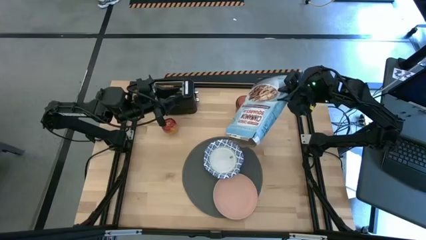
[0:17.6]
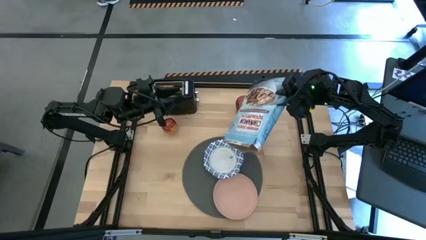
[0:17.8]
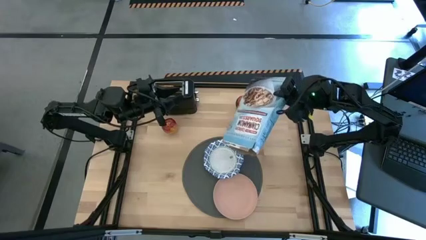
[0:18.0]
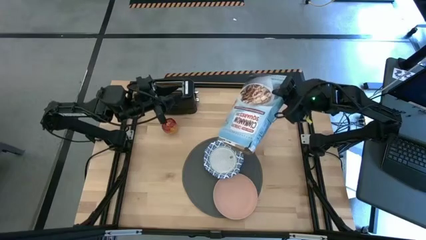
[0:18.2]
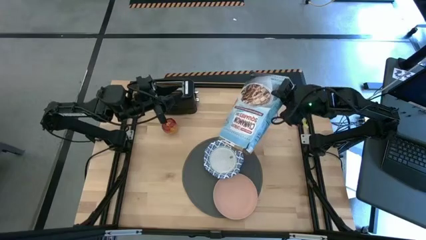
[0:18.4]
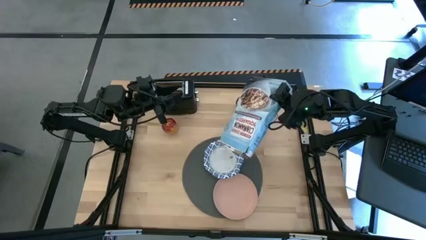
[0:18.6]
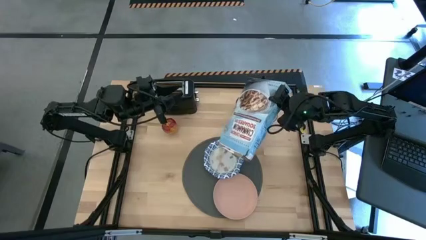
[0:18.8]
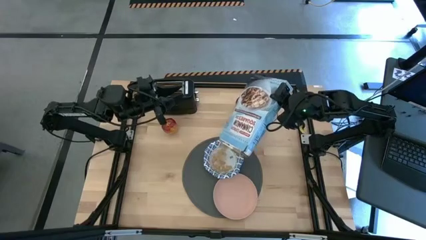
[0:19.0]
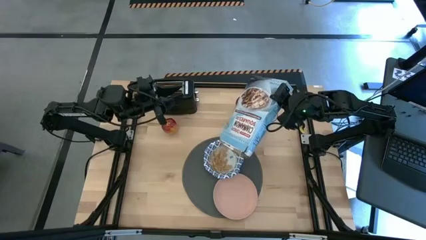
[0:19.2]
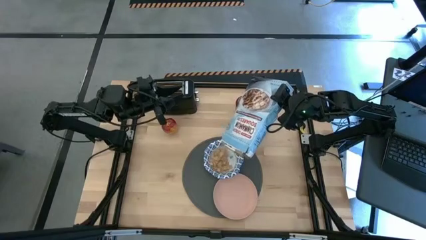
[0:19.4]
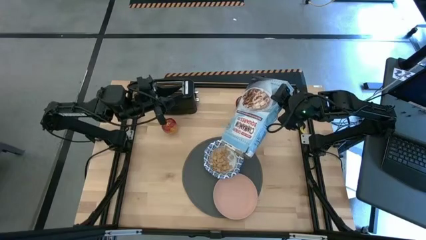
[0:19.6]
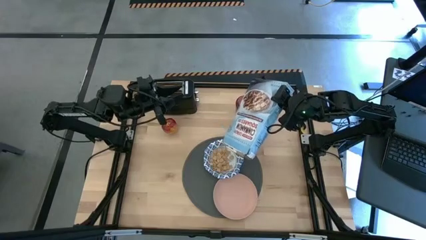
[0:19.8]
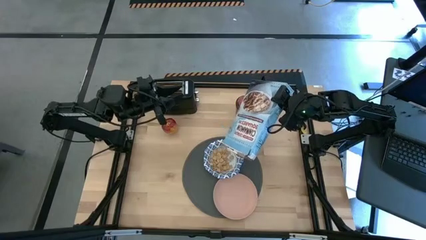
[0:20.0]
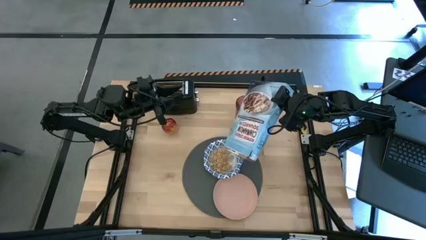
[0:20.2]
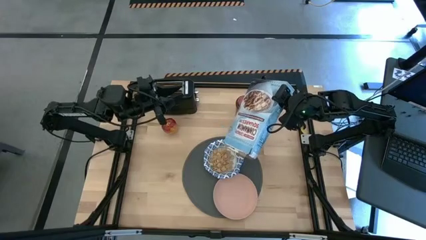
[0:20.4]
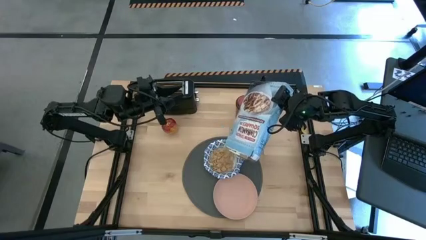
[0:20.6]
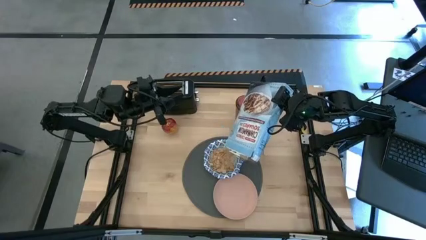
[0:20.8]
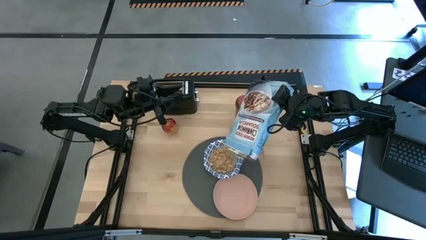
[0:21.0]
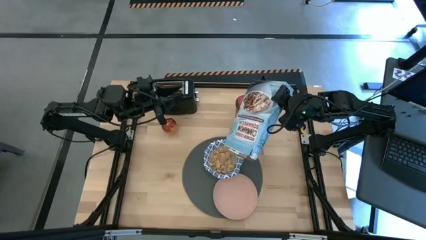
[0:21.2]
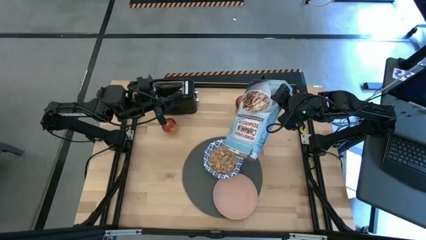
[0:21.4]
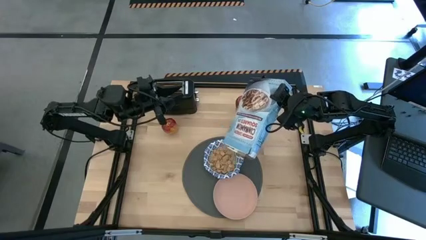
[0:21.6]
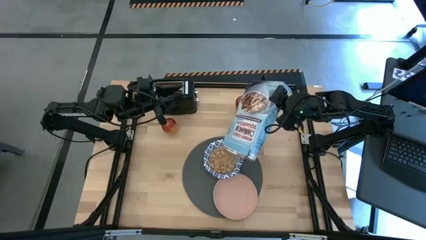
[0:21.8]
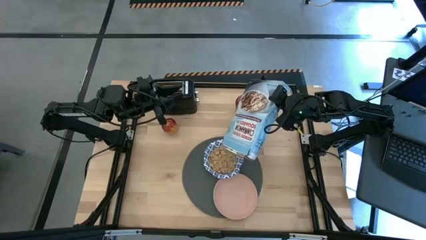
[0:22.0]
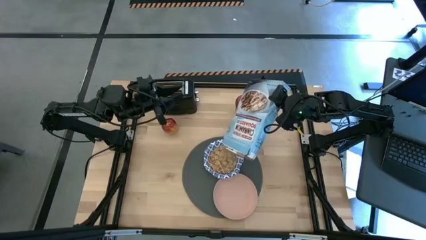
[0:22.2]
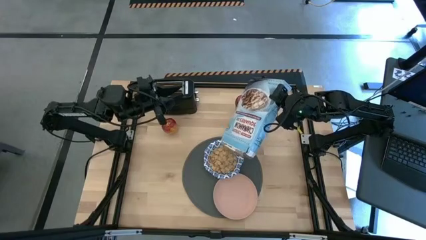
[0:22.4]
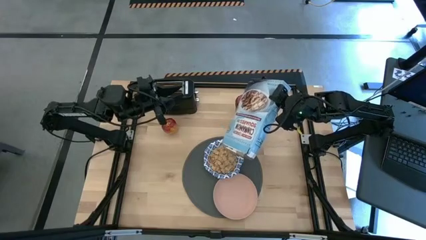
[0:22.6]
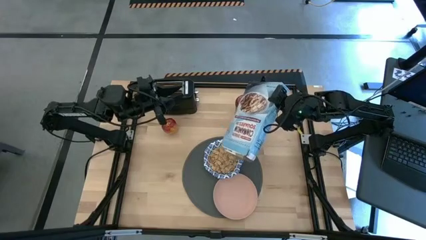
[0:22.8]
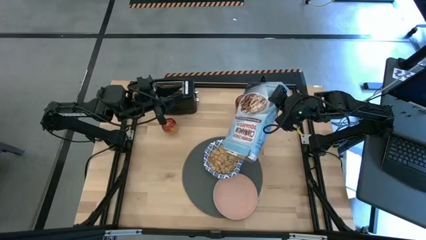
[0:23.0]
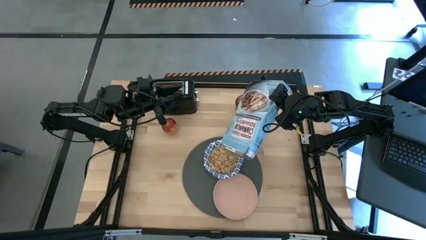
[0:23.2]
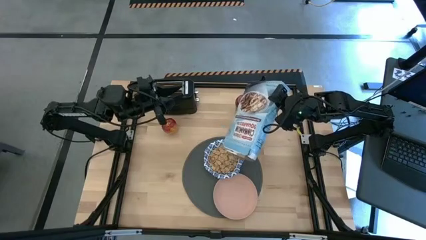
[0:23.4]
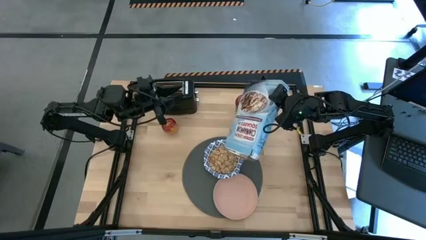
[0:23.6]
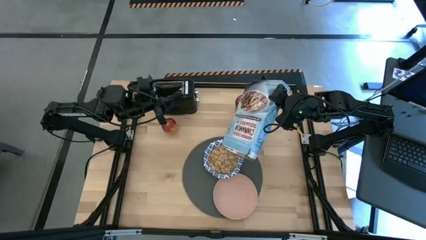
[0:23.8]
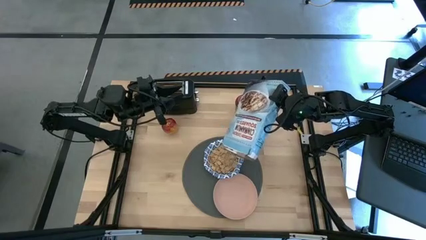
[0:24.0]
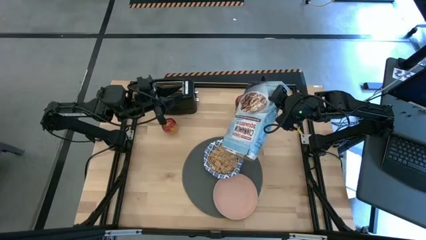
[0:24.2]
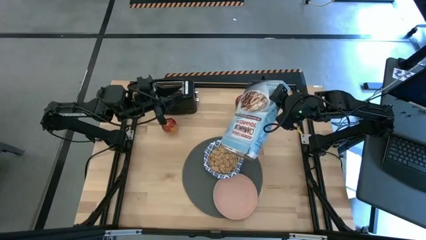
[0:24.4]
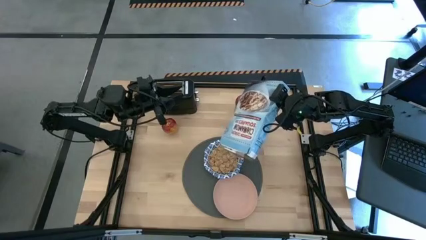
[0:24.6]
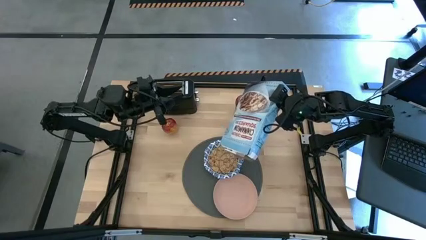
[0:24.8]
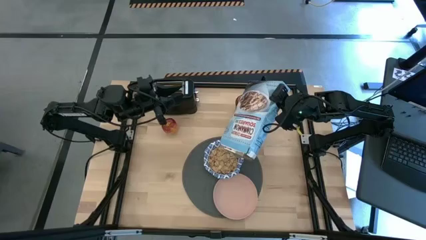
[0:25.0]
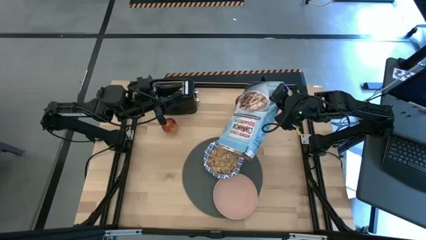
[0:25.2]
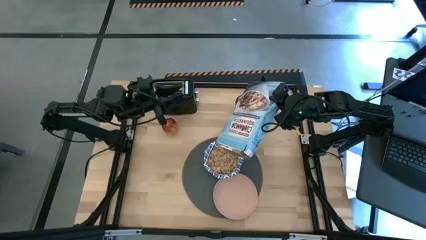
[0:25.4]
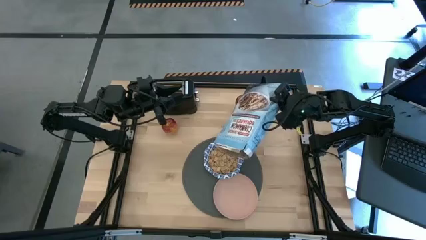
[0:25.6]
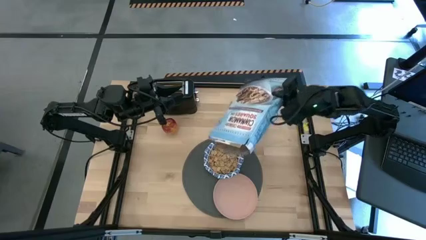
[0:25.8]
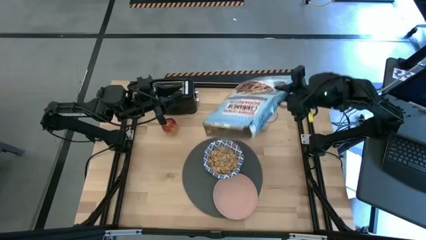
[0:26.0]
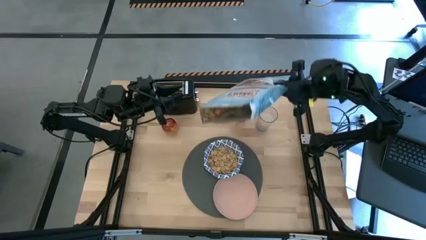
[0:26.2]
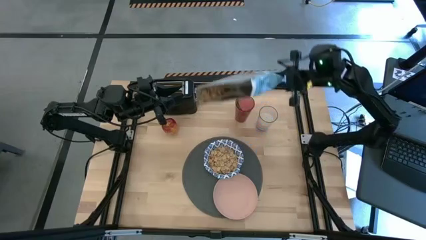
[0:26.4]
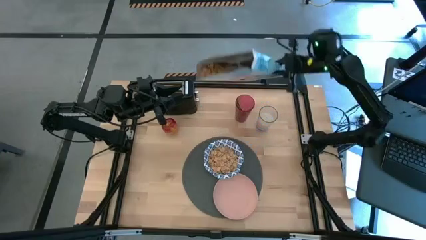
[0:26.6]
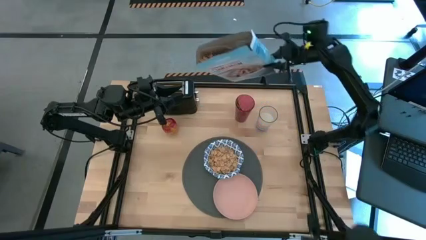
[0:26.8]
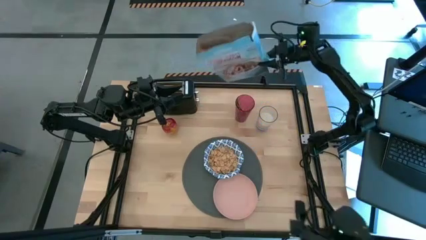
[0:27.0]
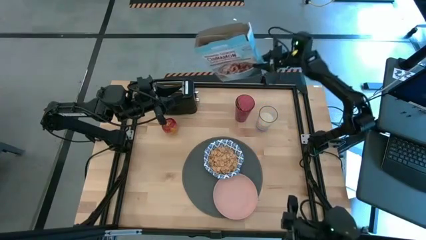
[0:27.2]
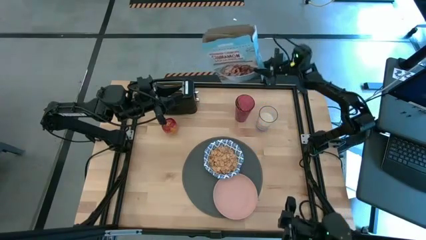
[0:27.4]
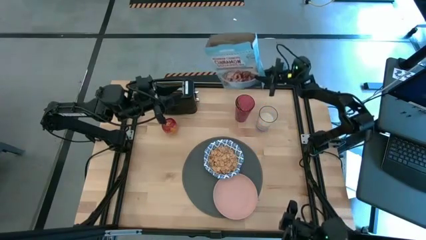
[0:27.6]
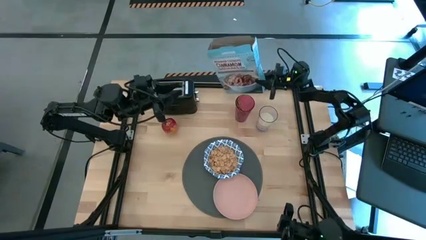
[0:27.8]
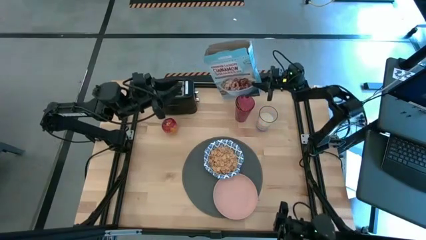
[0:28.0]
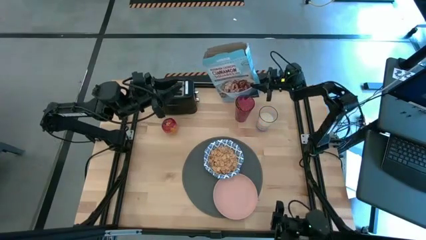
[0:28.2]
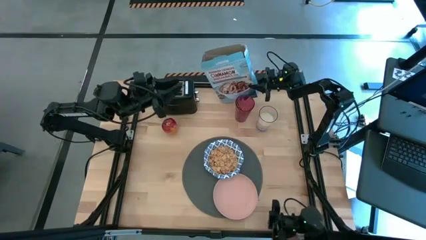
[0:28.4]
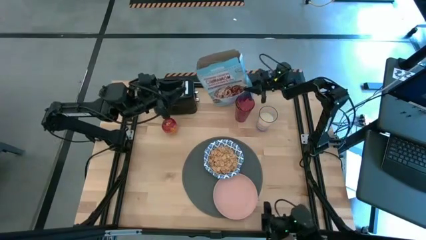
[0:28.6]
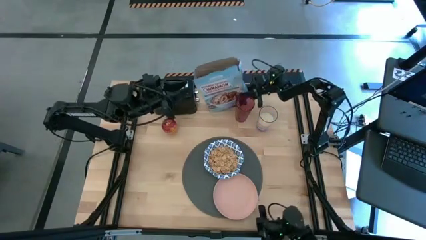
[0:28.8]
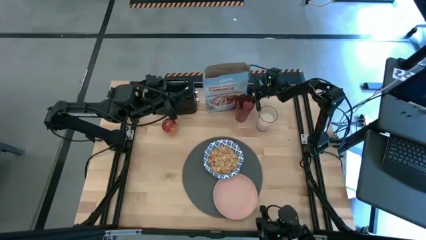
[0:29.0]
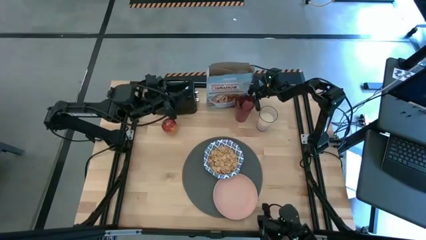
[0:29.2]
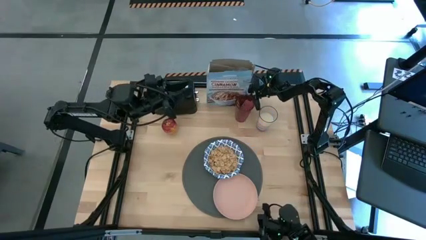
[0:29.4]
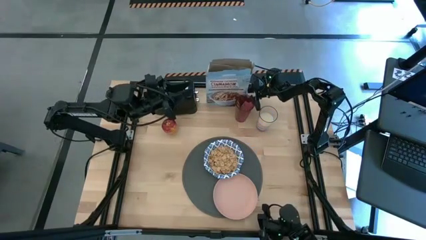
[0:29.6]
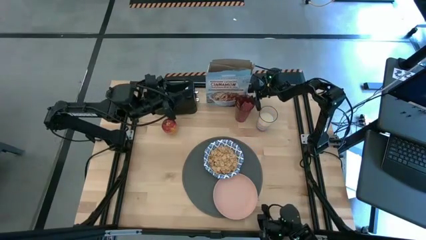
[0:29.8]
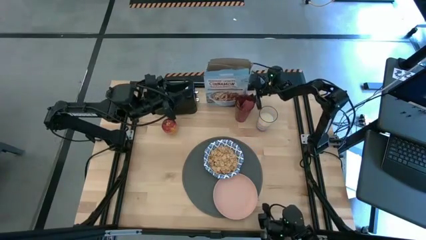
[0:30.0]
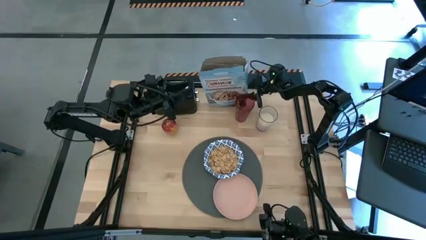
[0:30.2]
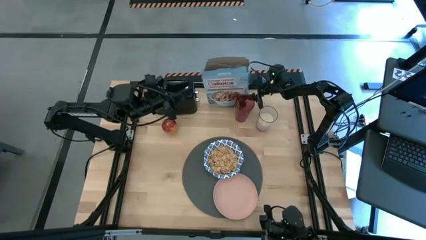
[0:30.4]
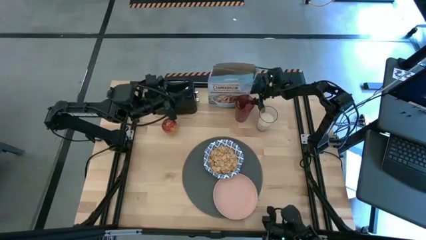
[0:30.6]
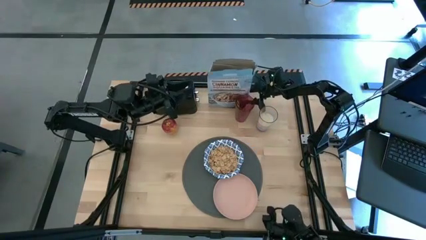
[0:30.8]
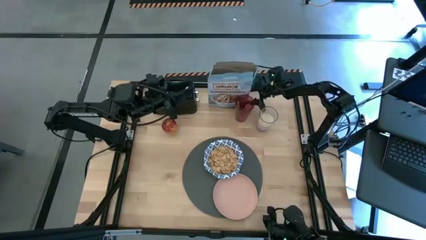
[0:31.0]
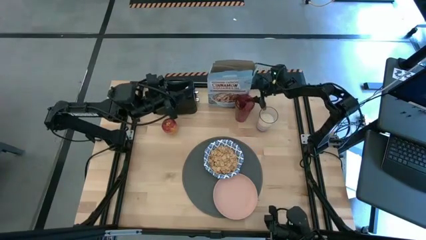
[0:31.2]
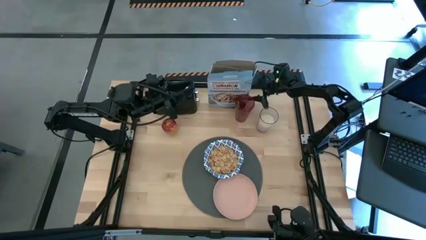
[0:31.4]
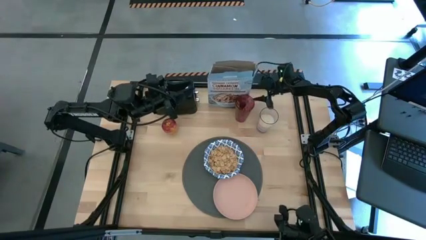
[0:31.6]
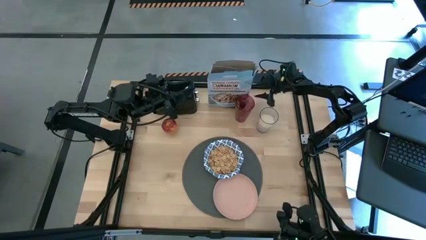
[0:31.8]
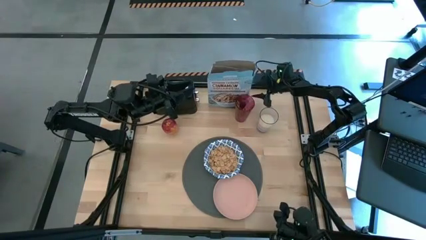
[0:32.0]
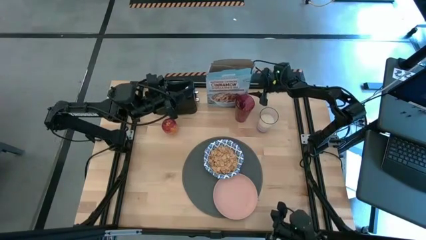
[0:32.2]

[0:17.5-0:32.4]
Task: Arrange a breakfast setting
Pour the cereal from the cereal box into the blue patterned bowl
